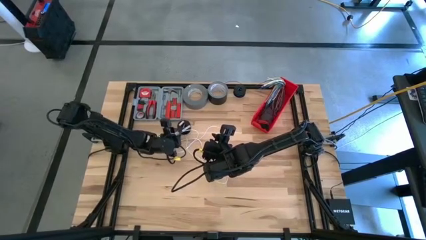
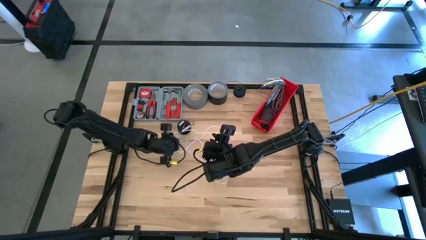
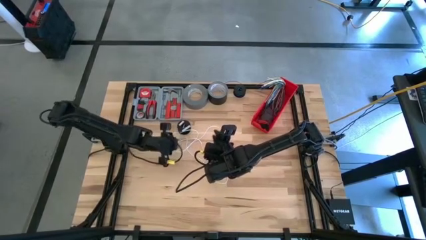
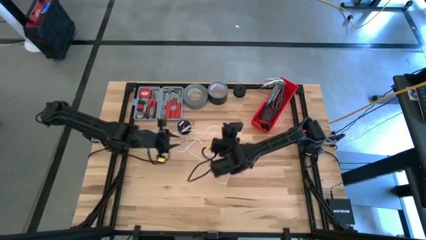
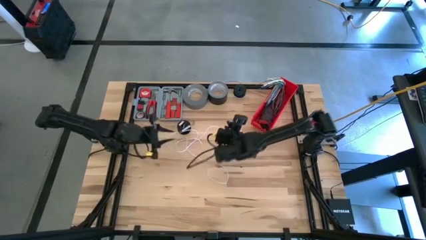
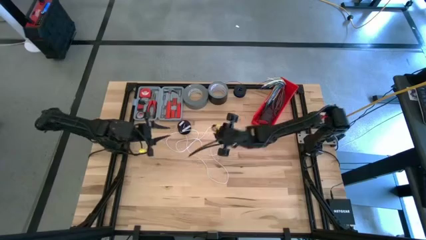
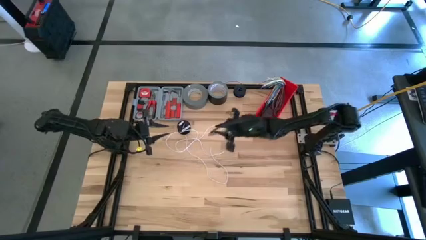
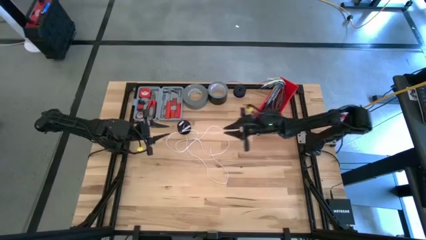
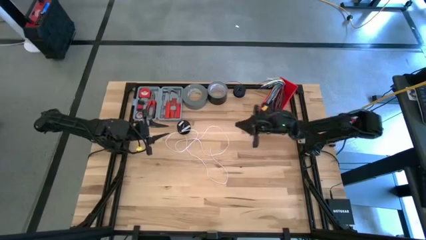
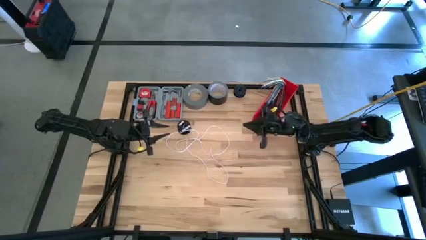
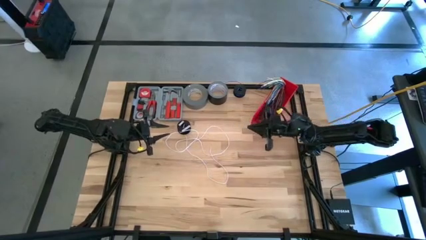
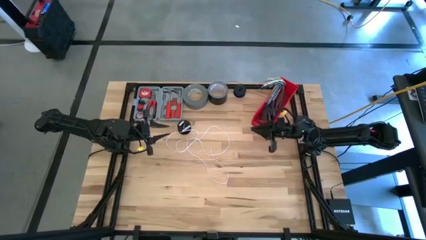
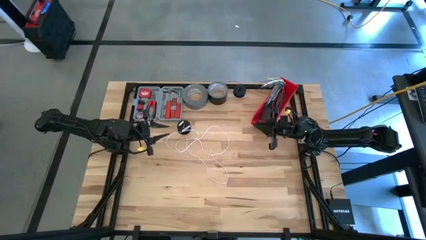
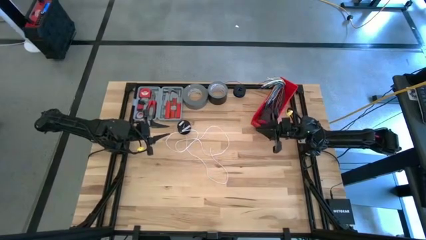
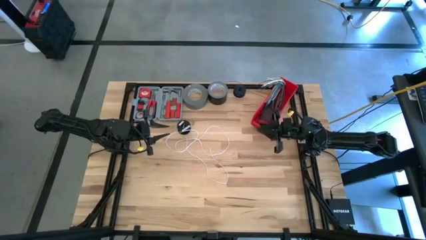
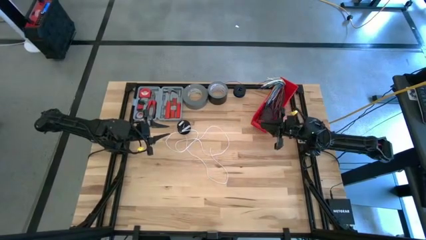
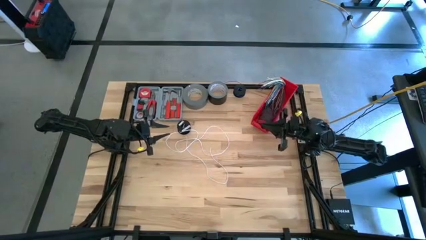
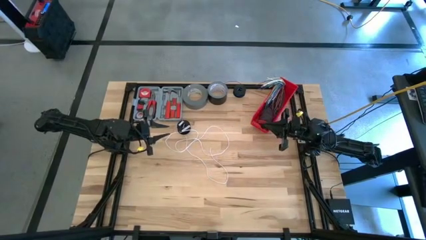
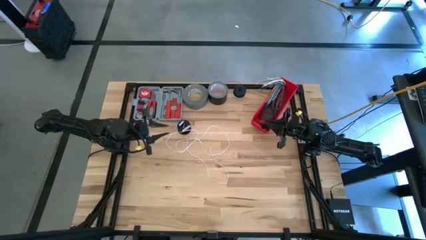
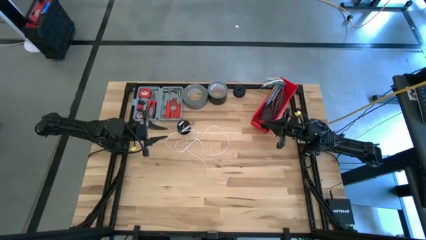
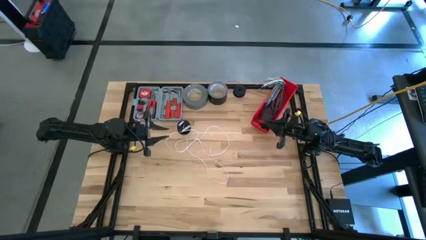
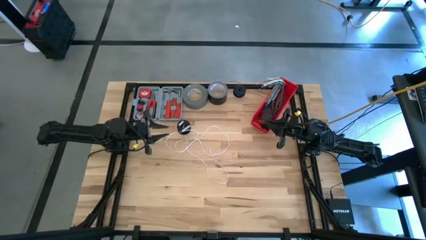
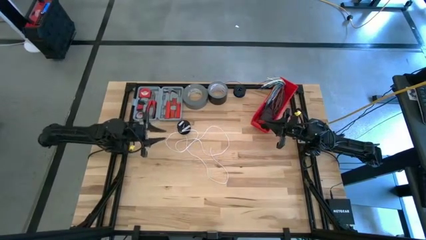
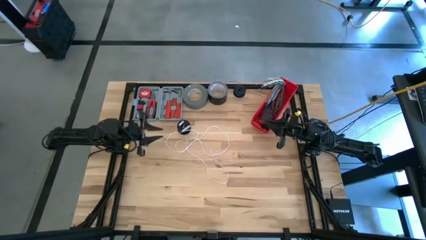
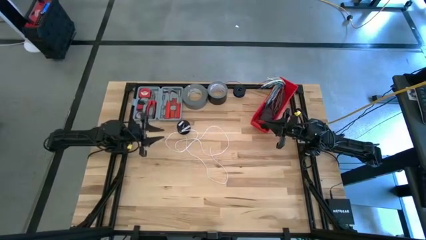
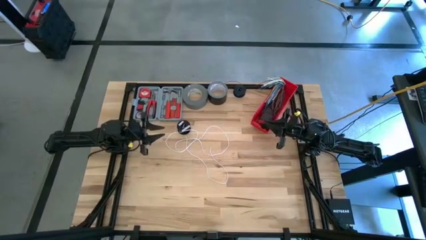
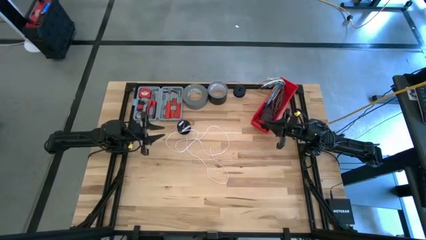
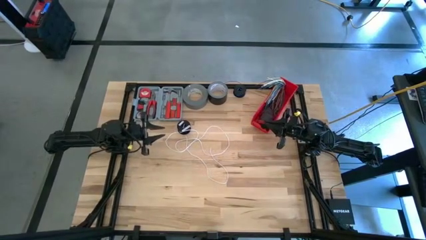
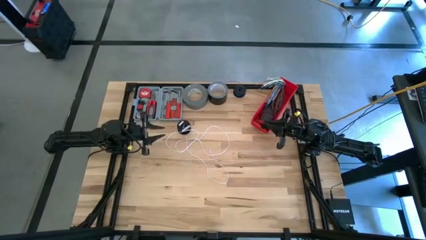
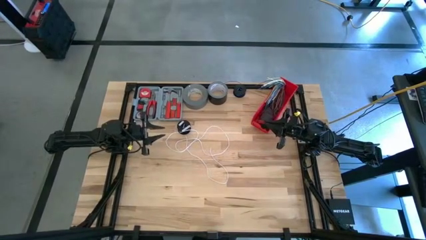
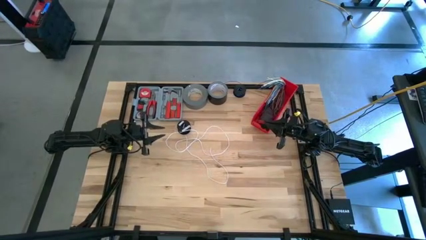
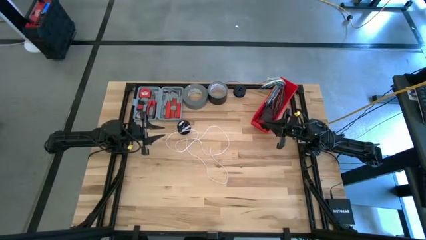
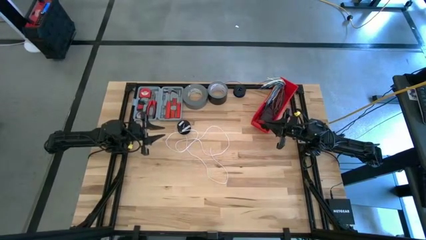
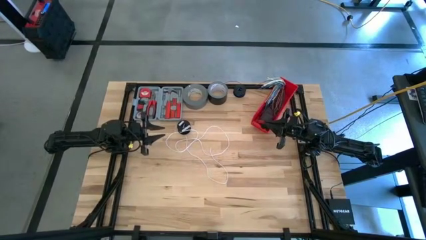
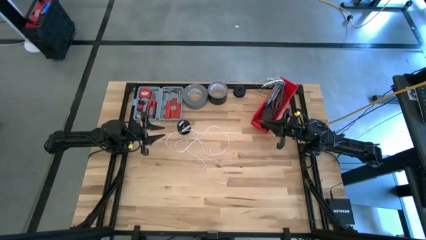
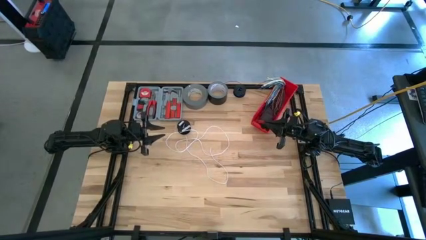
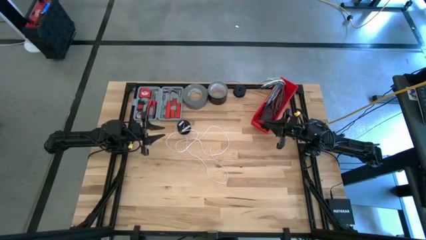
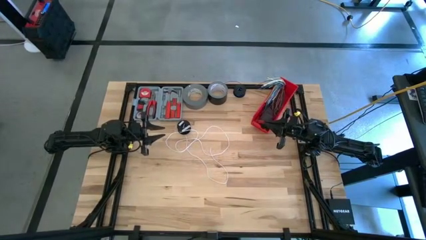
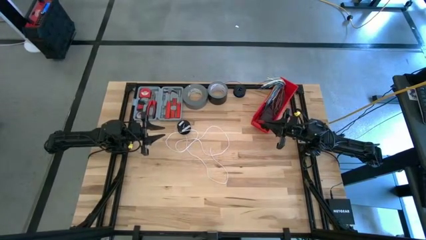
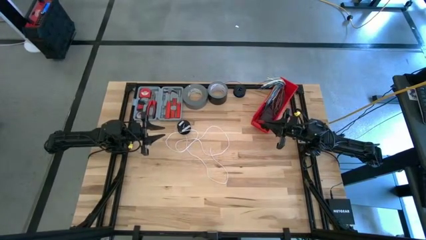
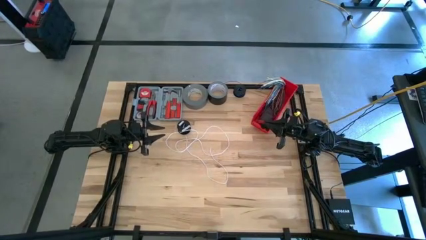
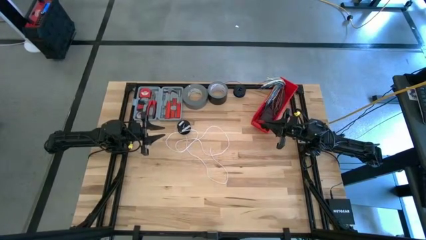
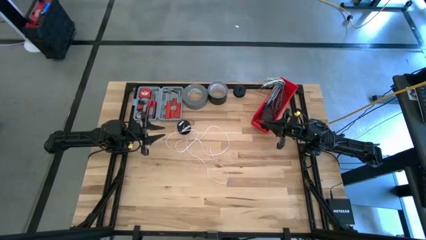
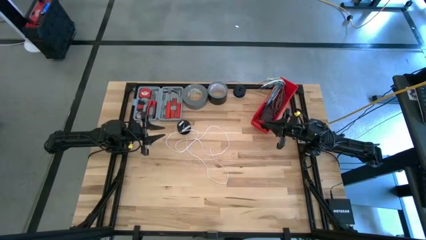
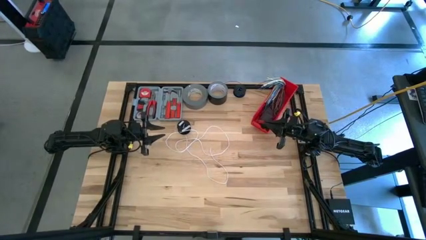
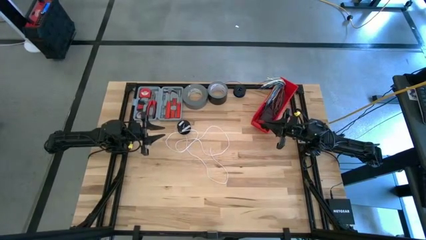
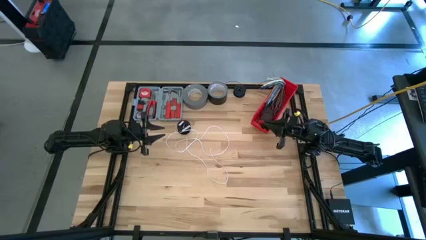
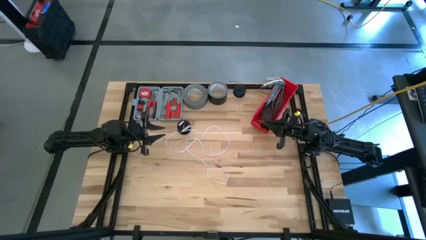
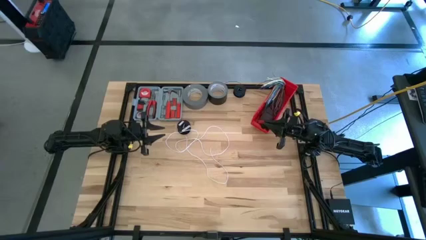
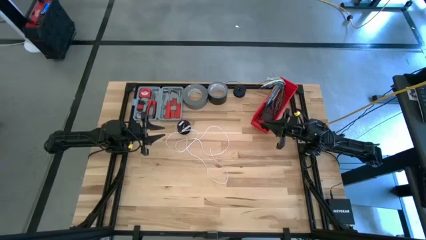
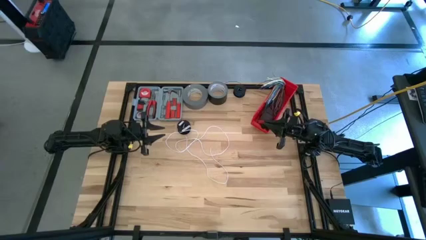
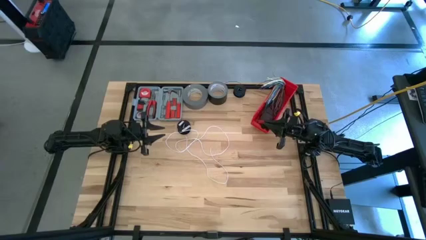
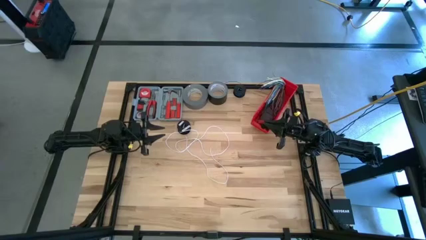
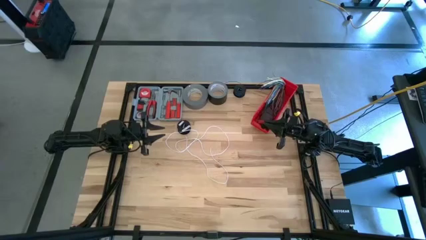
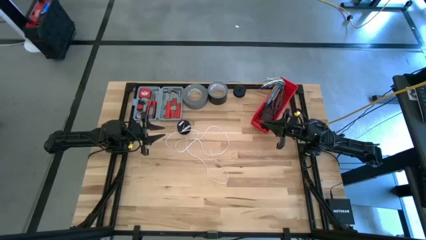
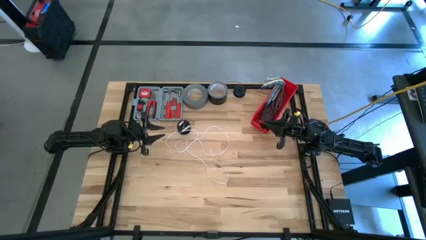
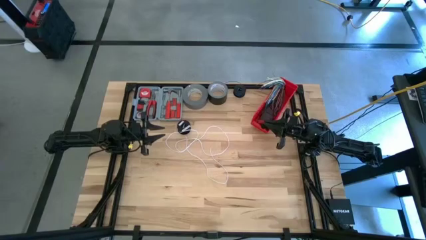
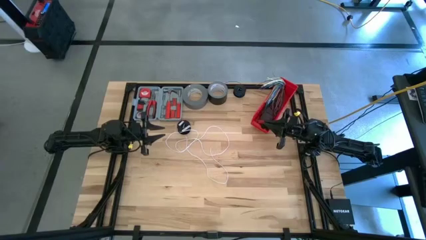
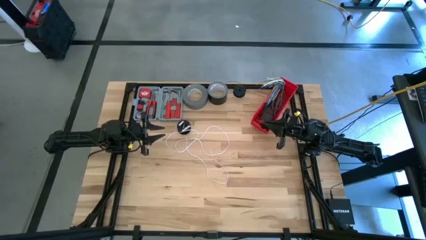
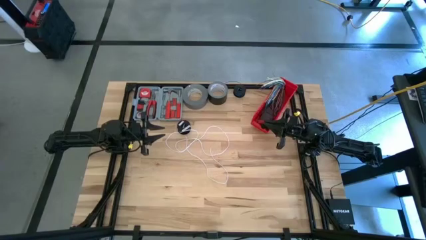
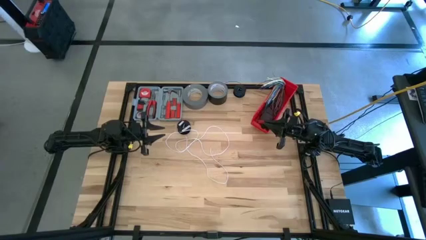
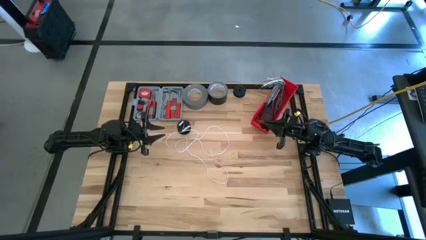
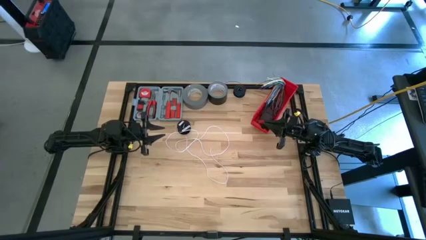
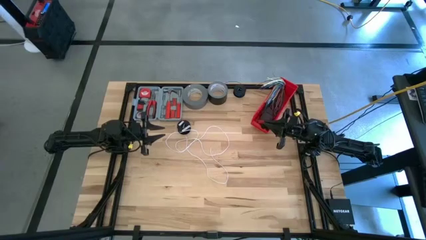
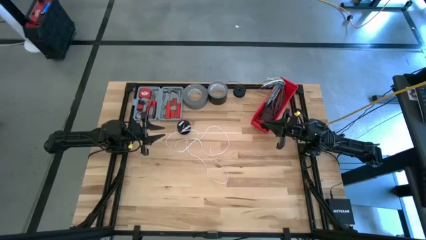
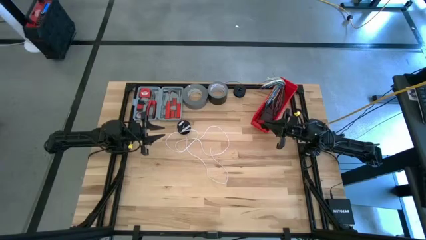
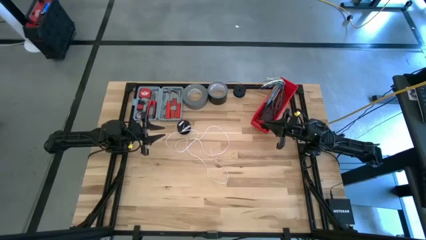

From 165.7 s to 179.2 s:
Task: Coil cords
Return to Home Position
